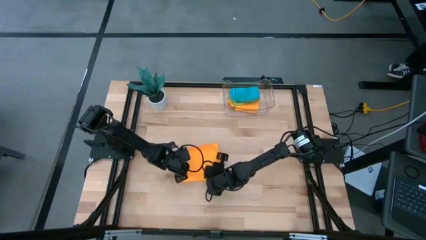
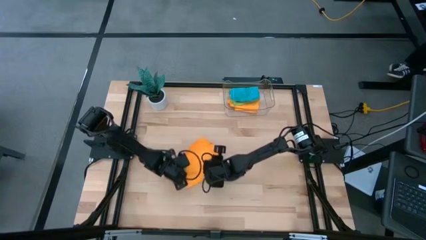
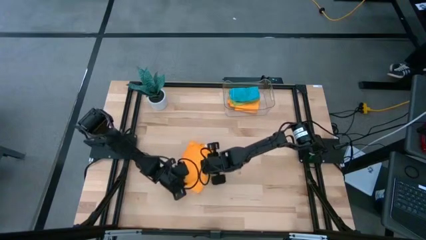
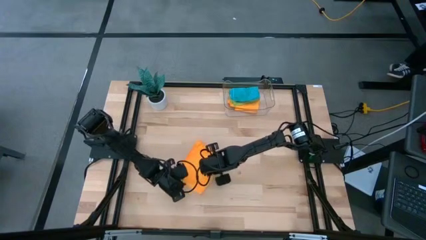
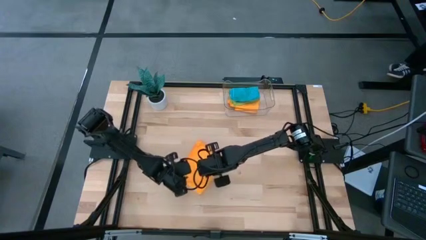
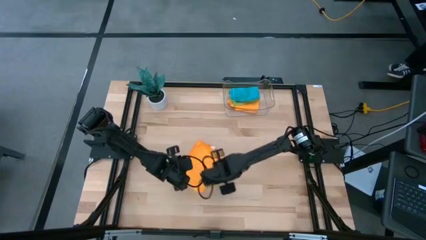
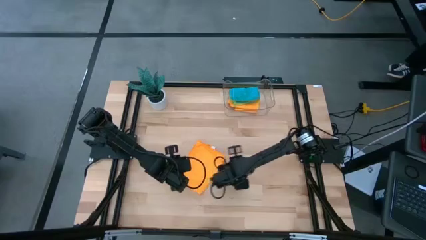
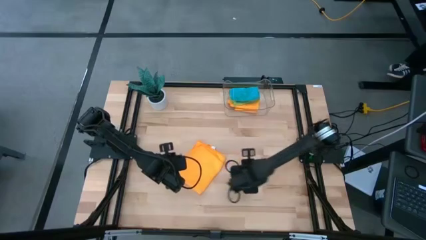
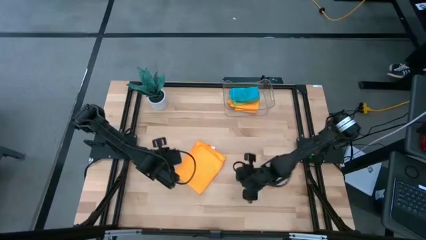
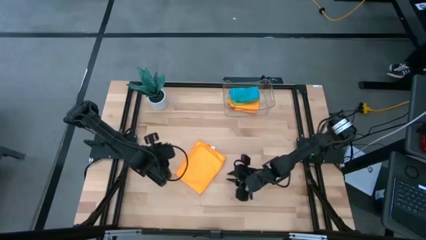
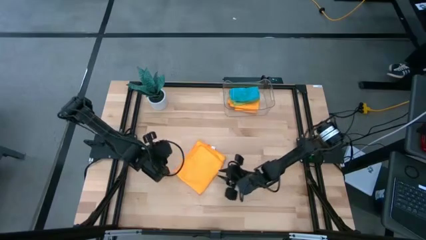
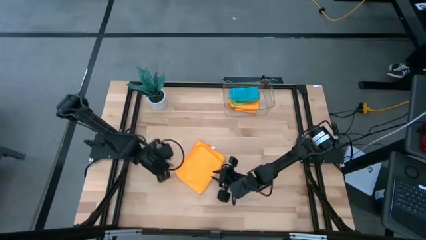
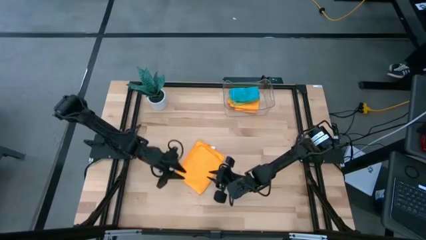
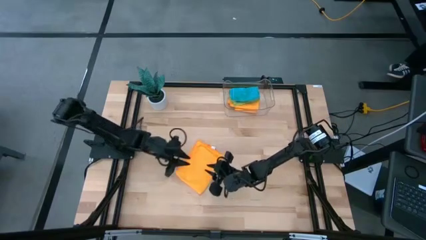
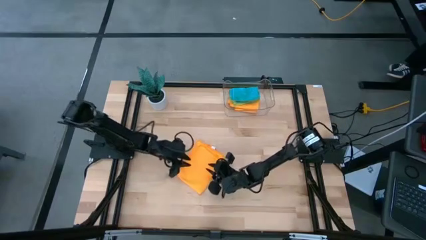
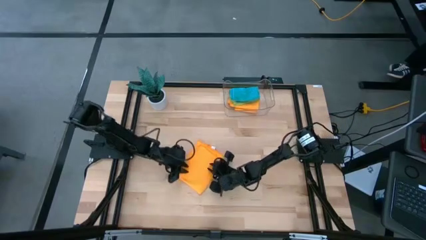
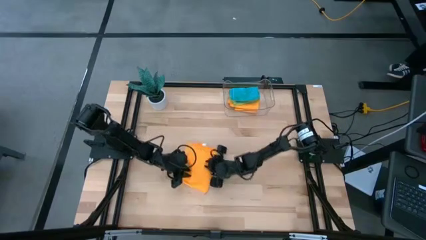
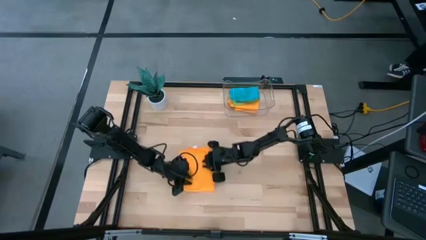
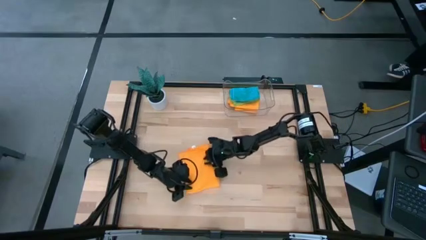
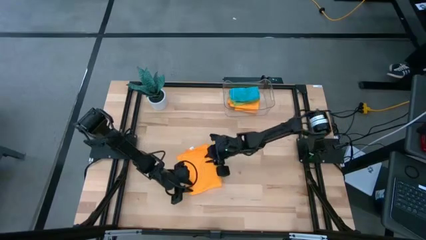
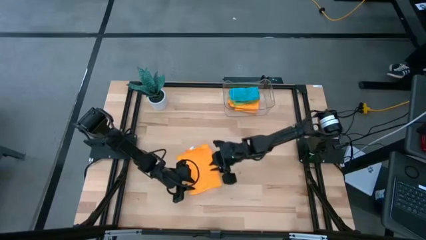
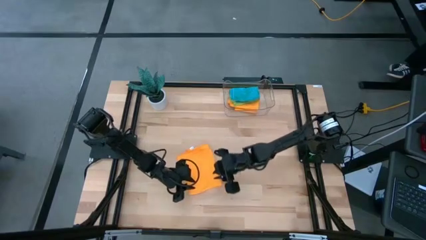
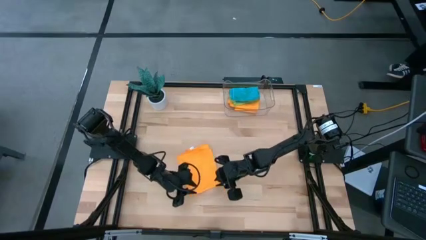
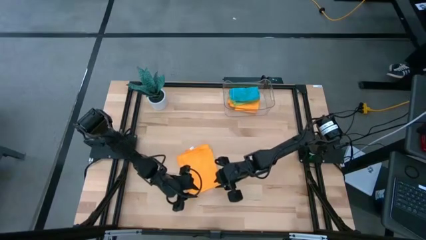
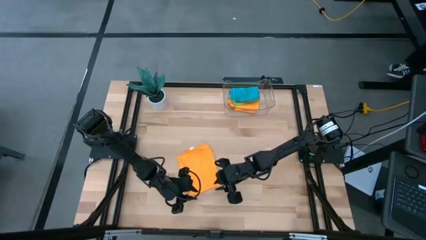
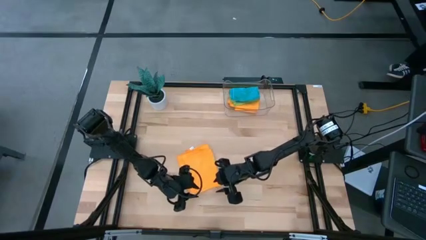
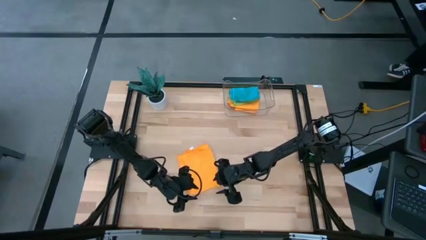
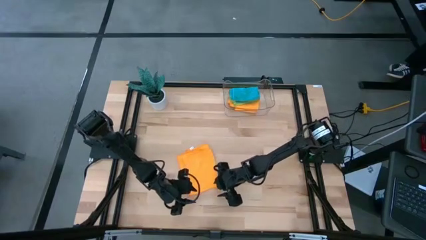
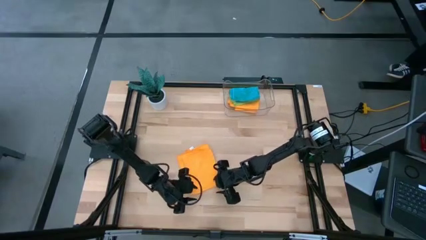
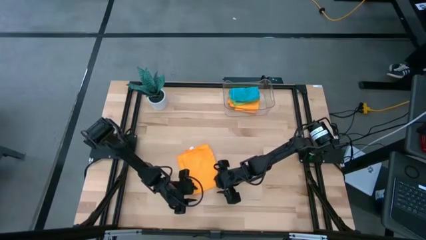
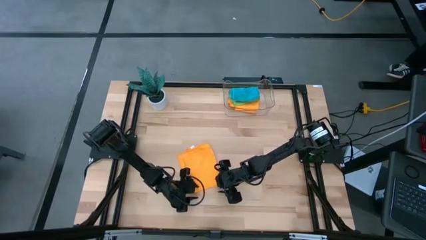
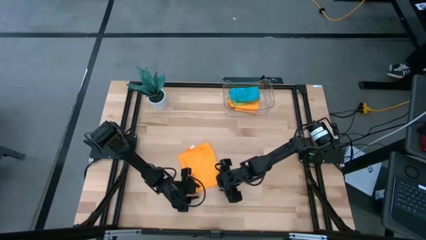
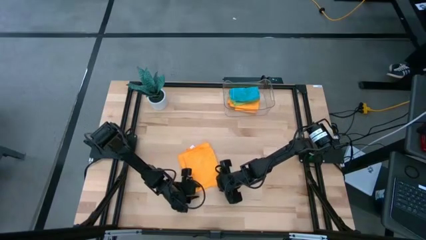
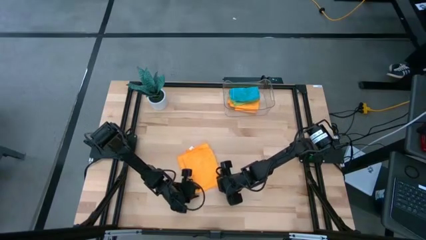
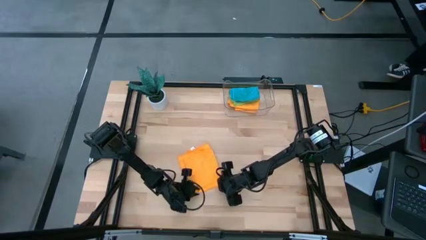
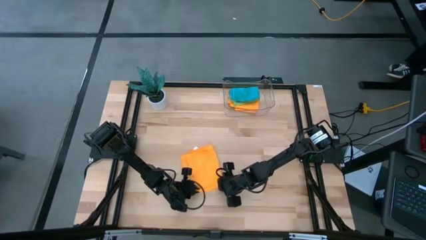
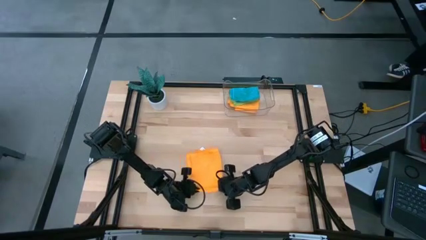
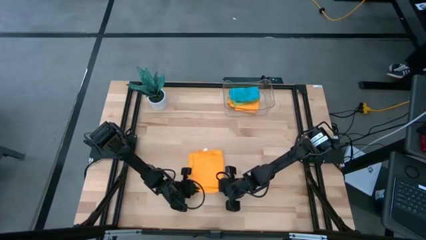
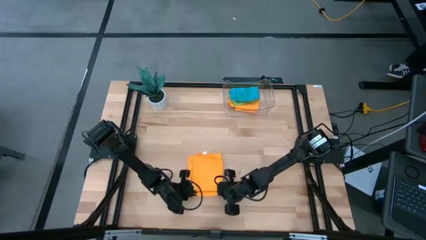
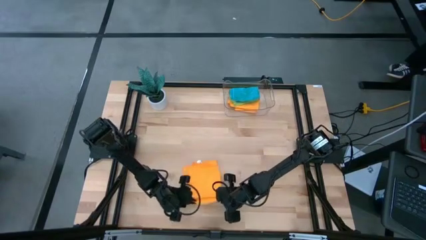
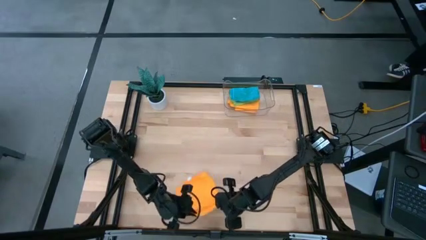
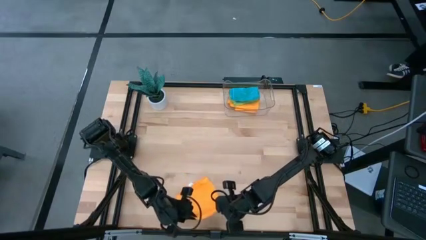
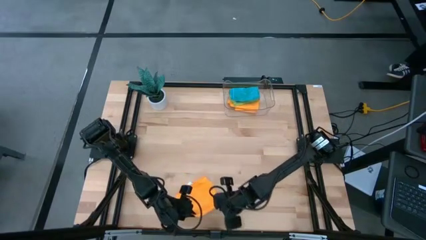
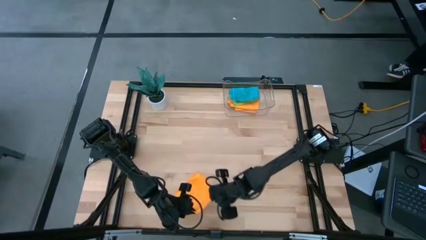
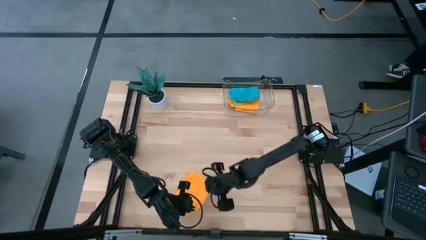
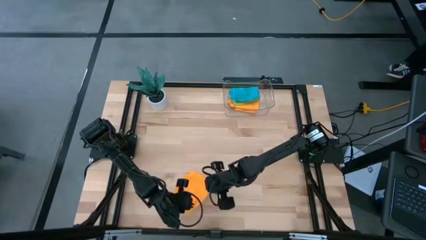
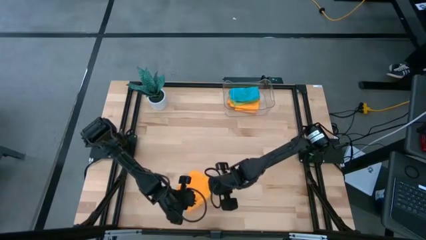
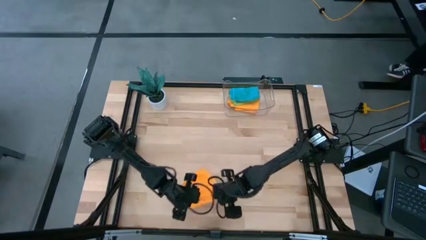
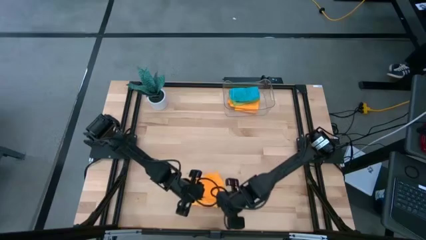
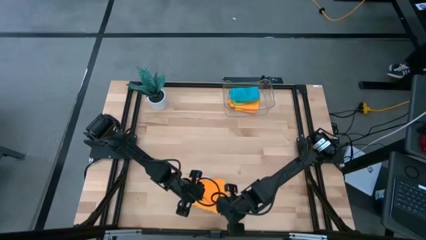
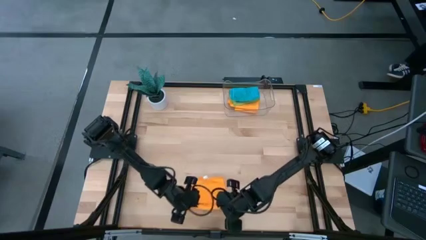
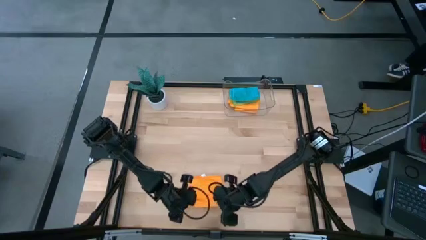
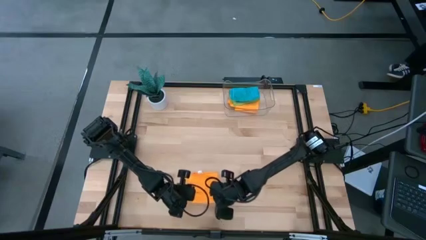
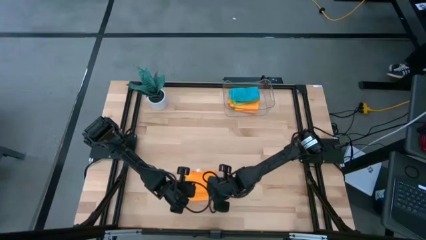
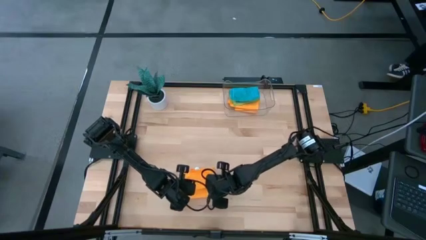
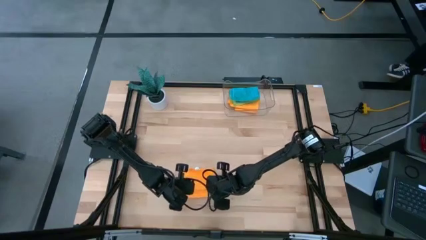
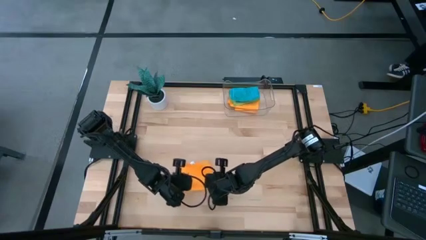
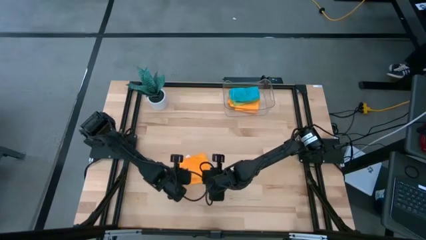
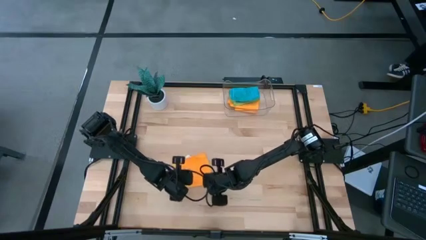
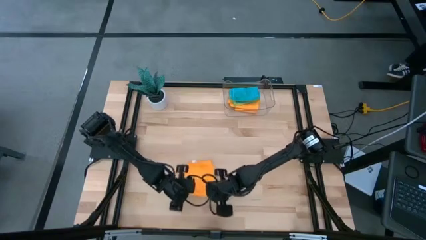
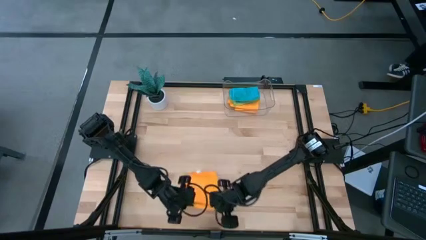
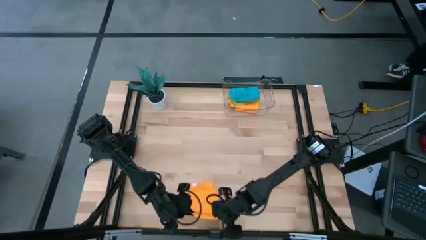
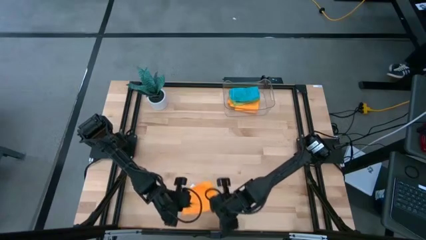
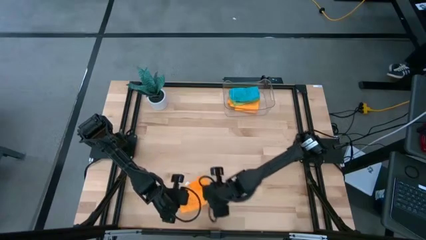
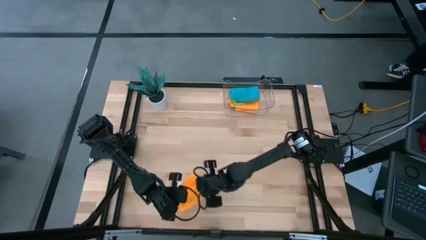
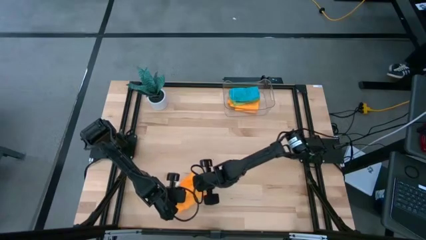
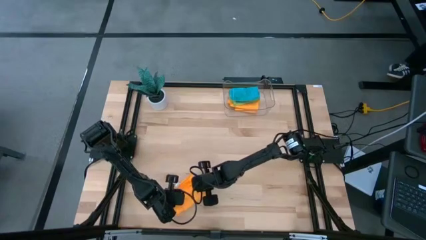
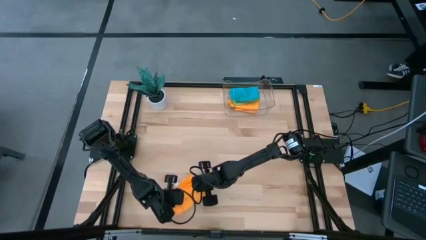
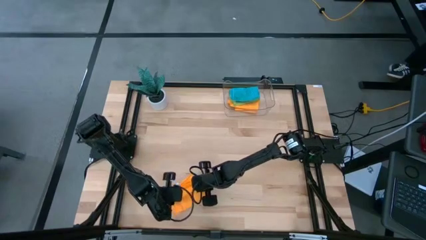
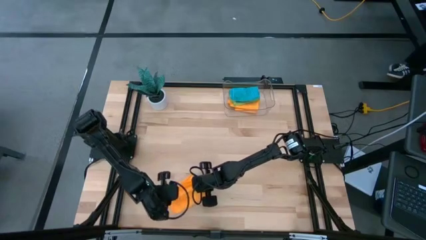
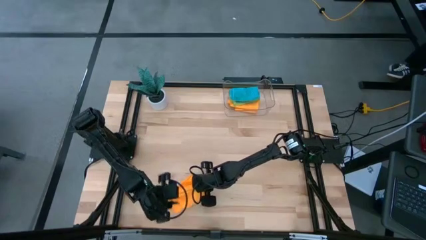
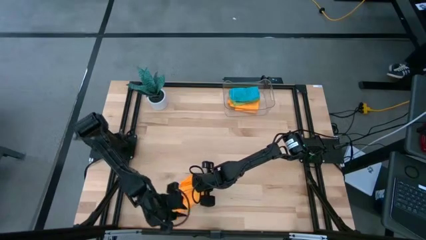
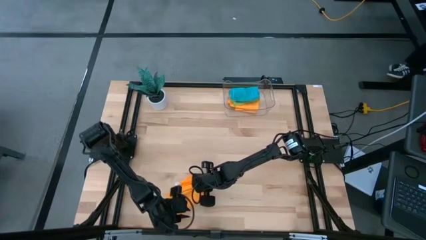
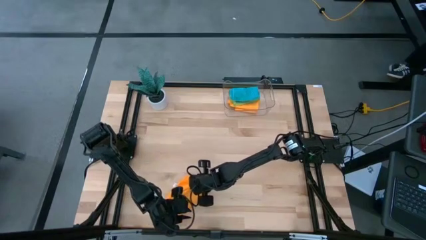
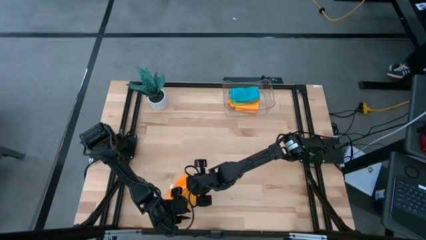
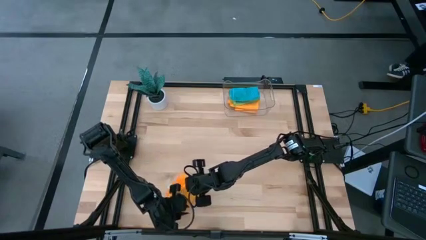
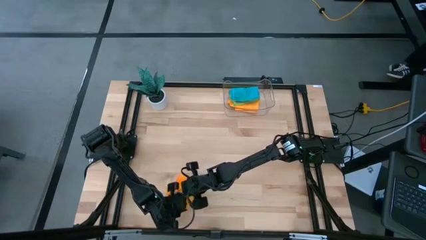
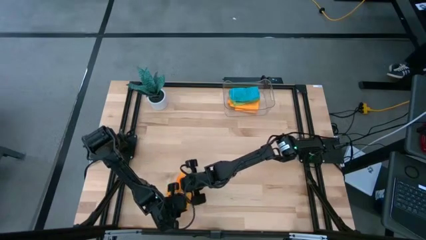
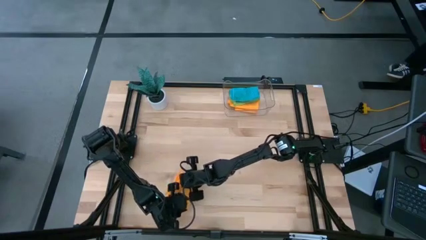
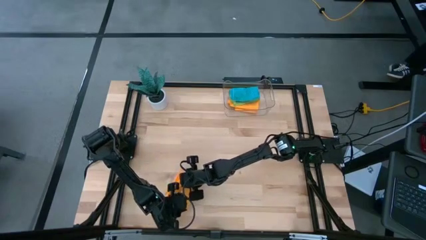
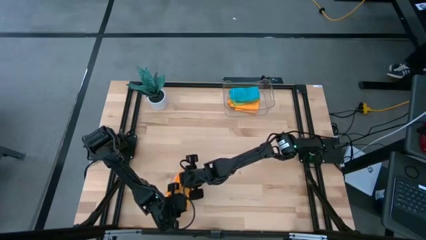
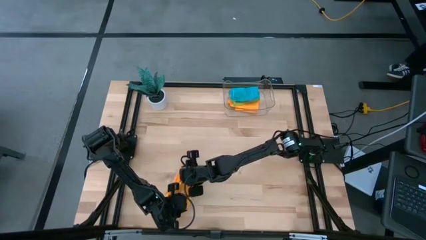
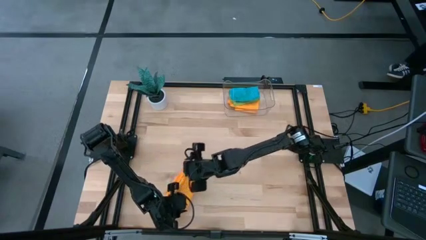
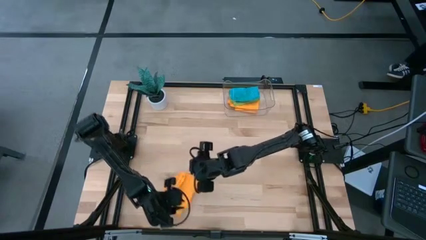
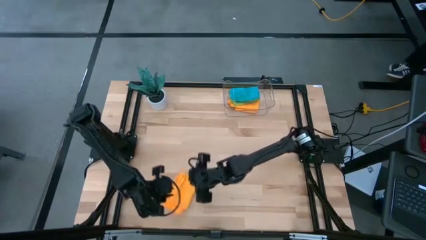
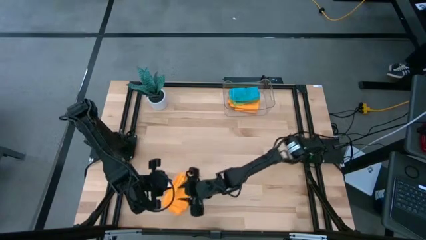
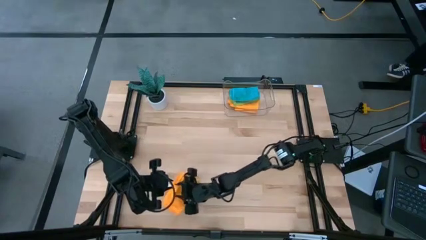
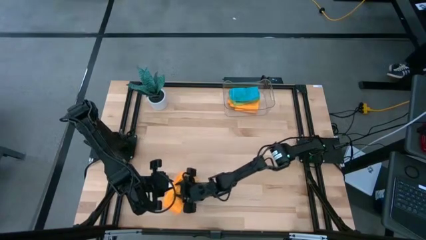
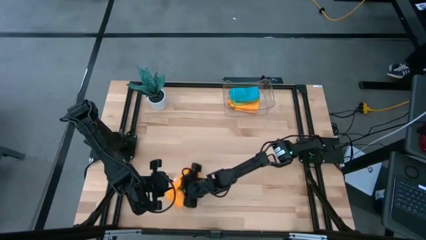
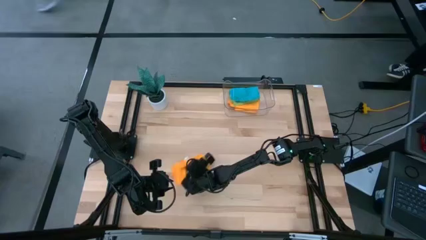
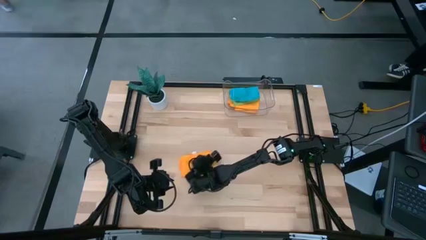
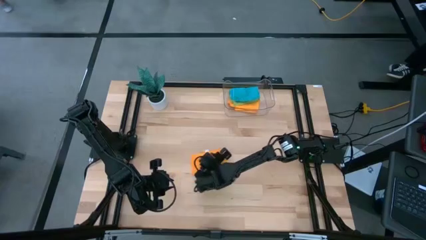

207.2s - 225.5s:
Task: Fold microfiber towels
Fold the orange microfiber towel
